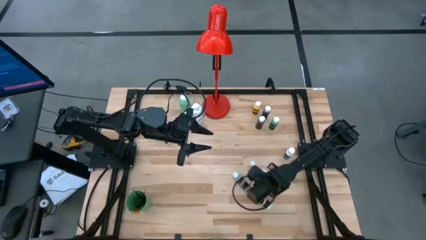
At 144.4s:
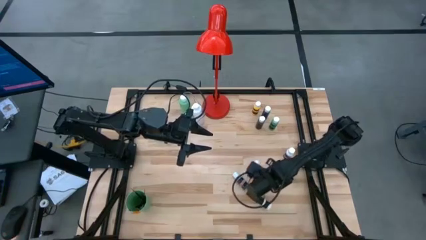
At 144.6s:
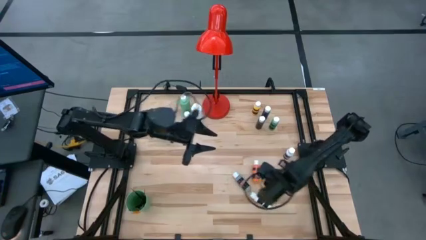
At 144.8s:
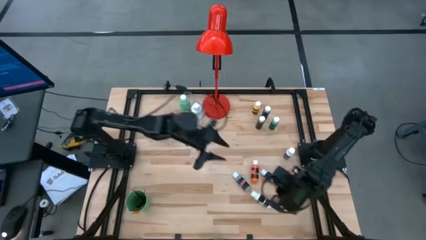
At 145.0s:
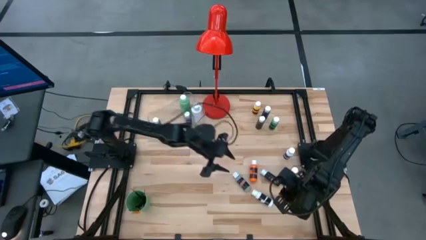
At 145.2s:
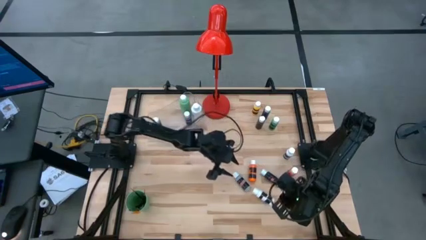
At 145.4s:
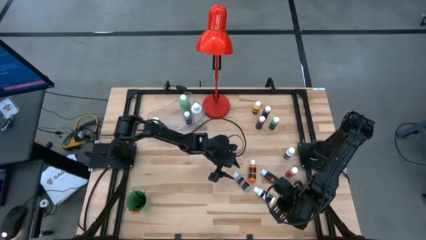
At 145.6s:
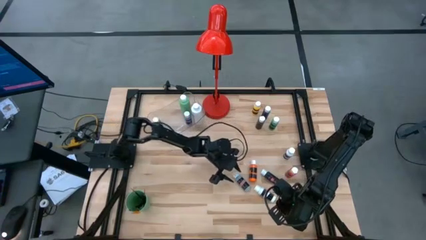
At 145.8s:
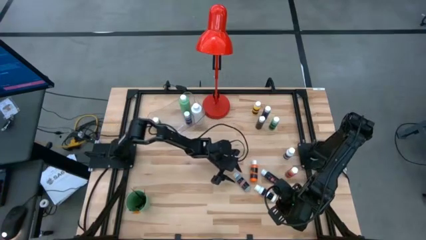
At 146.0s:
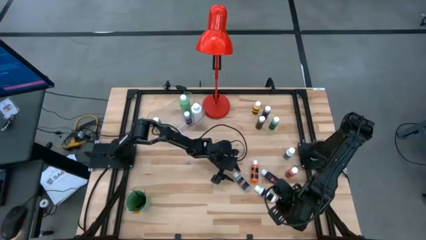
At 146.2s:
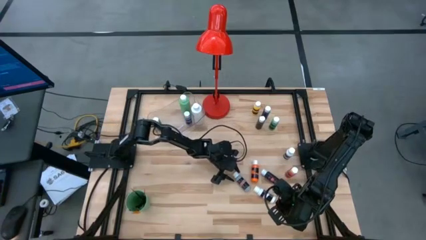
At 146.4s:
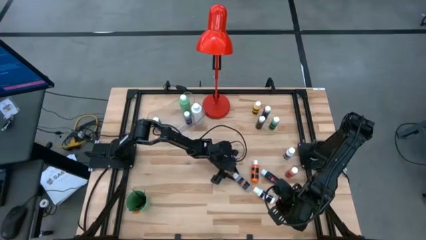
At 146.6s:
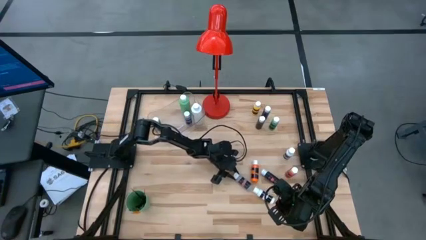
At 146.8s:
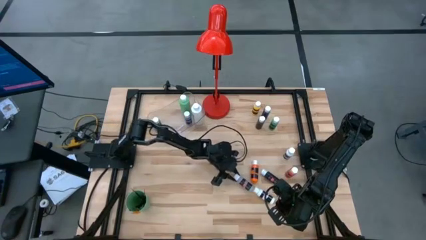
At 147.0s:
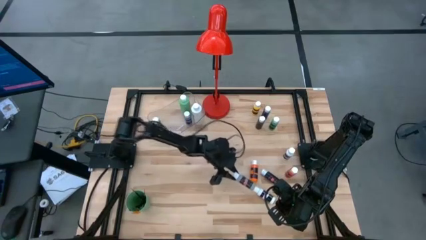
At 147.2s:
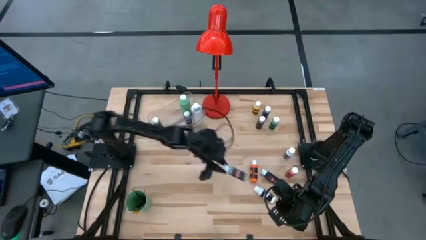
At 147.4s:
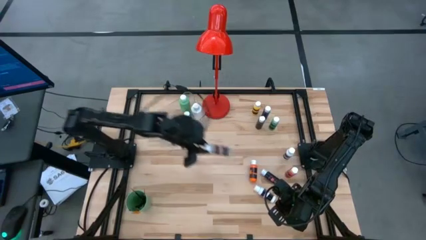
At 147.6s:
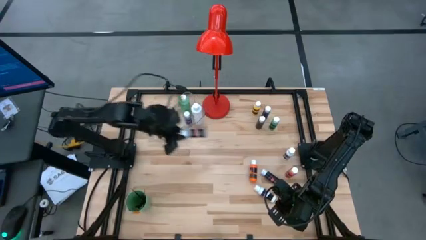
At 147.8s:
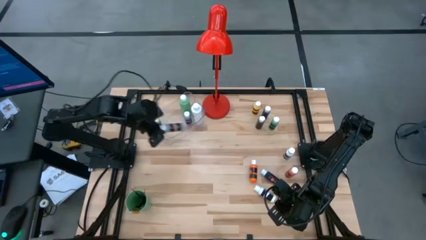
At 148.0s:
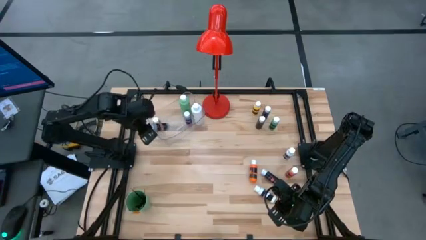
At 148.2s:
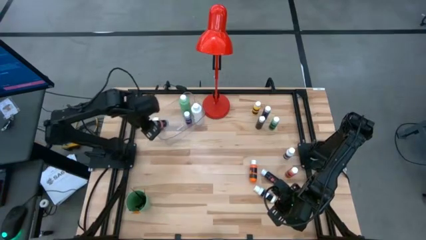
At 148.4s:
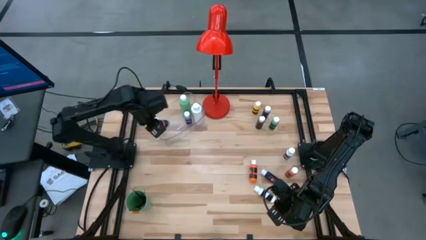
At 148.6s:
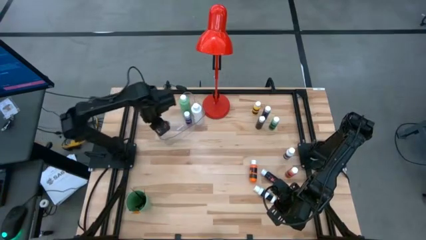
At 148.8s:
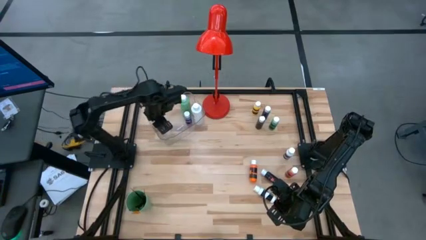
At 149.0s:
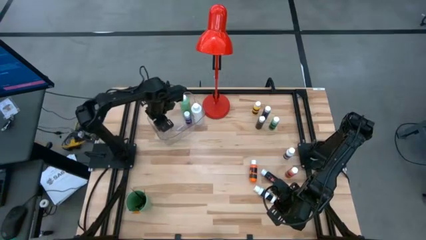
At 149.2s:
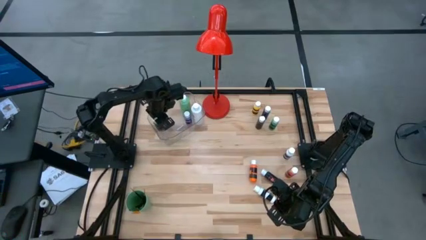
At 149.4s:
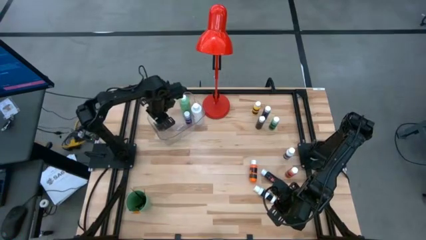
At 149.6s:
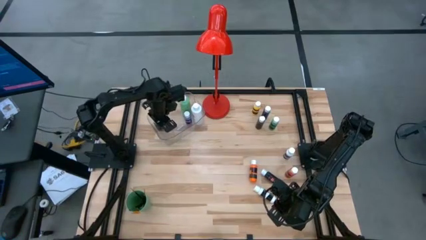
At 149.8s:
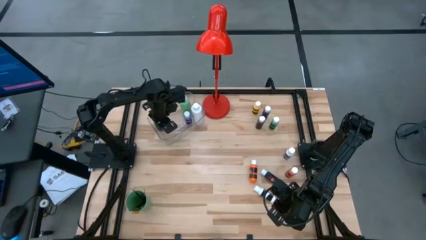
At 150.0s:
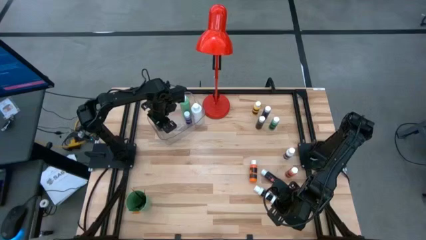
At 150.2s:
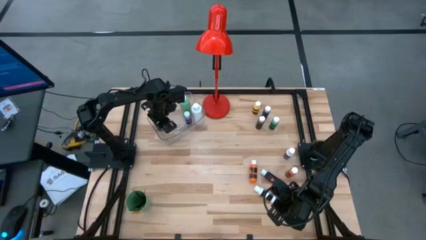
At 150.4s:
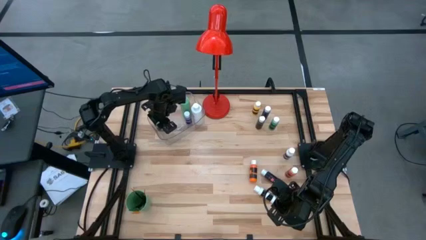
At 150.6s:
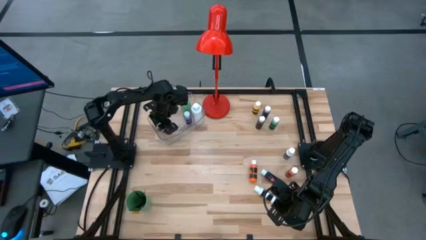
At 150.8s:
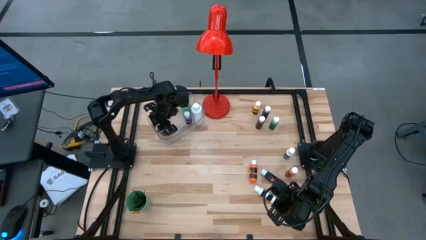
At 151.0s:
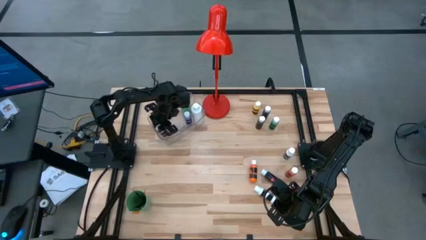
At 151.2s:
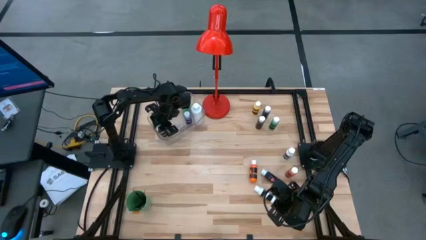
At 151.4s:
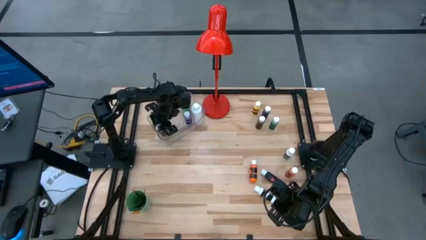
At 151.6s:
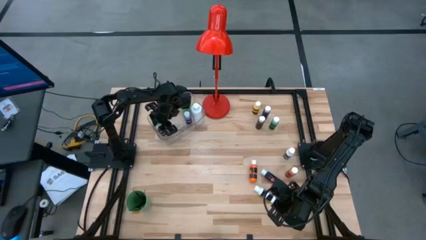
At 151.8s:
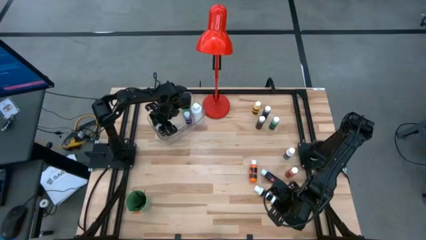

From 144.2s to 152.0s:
Task: Pick & Place Paint Supplies
Put the gray paint bottle into the transparent bin

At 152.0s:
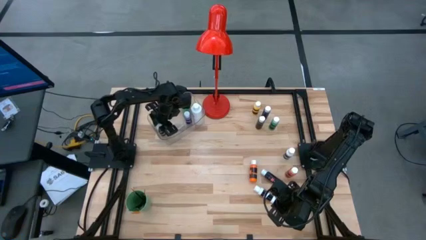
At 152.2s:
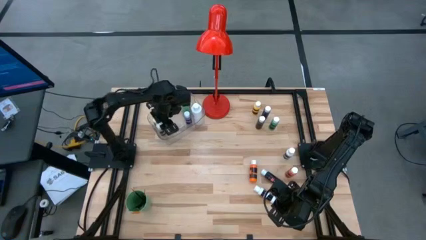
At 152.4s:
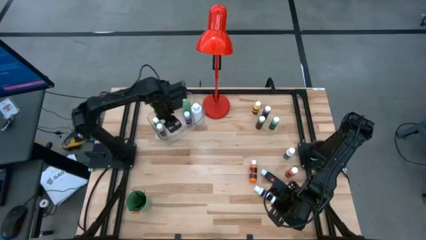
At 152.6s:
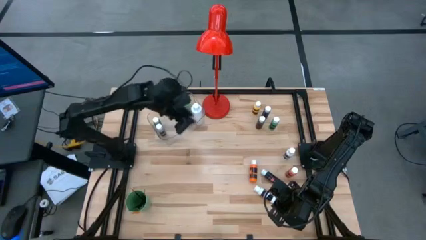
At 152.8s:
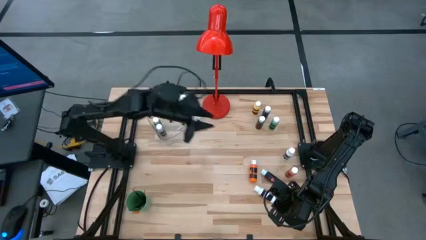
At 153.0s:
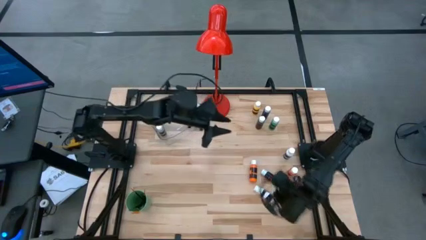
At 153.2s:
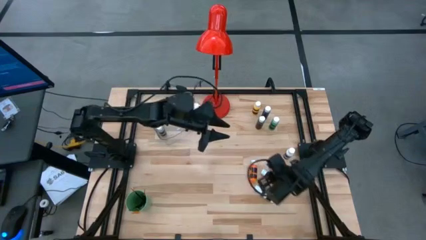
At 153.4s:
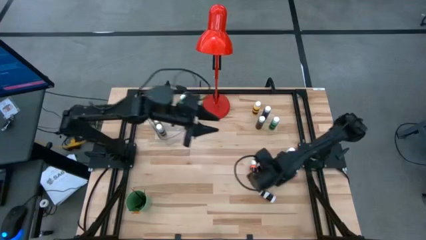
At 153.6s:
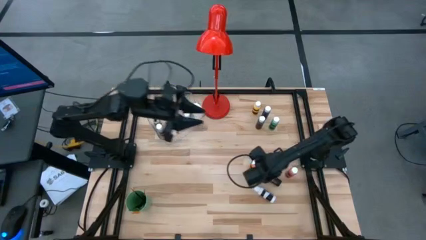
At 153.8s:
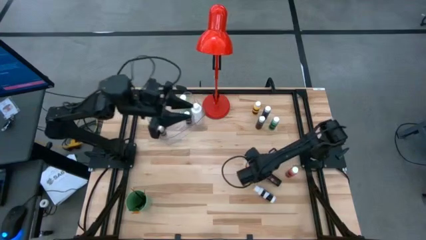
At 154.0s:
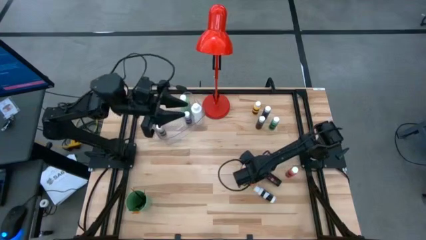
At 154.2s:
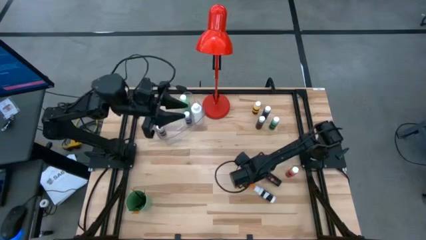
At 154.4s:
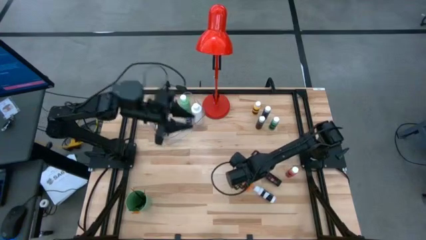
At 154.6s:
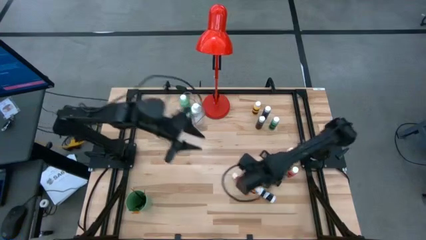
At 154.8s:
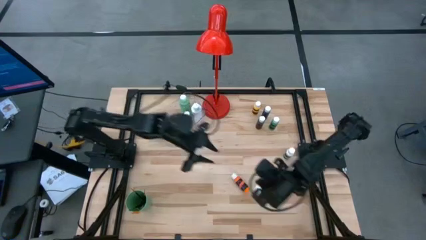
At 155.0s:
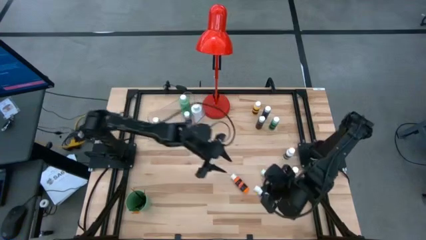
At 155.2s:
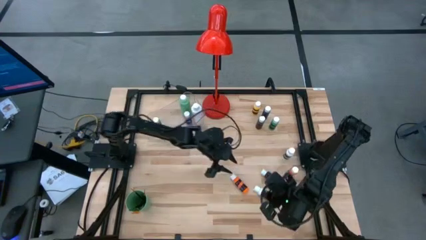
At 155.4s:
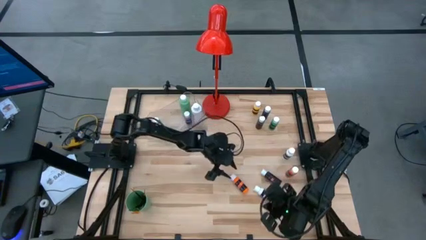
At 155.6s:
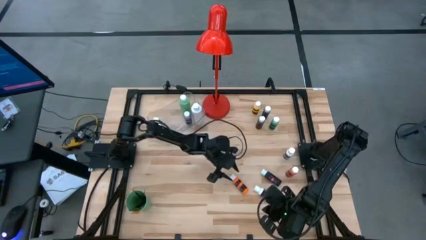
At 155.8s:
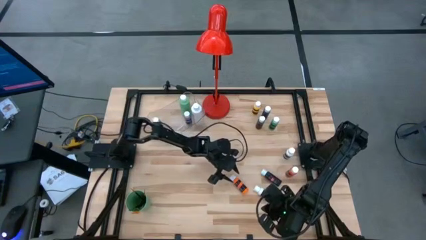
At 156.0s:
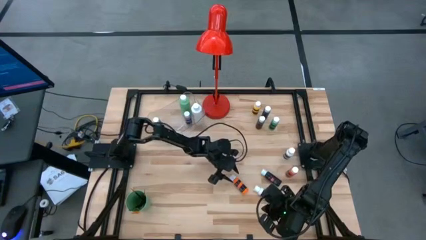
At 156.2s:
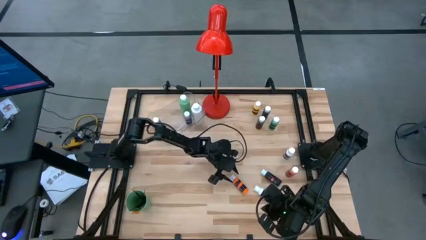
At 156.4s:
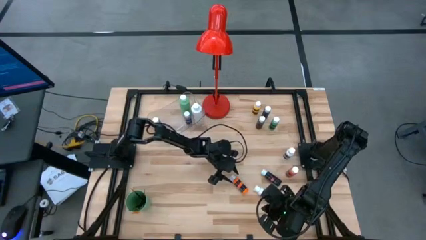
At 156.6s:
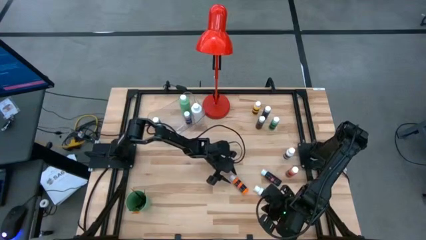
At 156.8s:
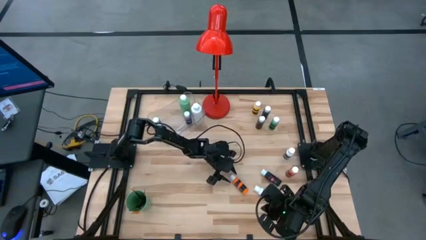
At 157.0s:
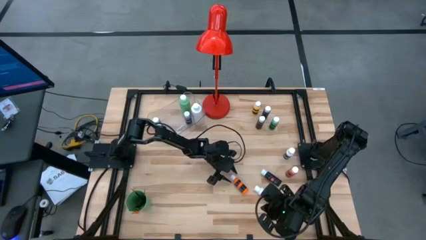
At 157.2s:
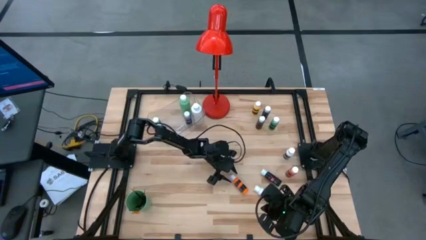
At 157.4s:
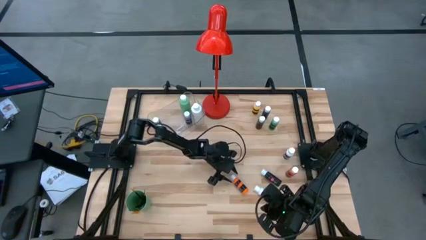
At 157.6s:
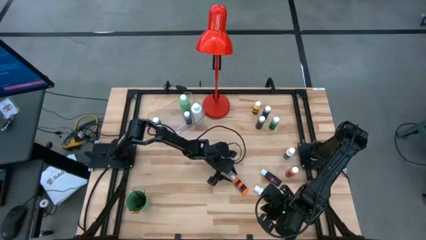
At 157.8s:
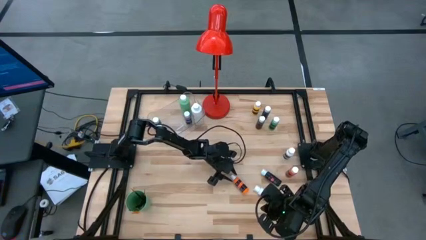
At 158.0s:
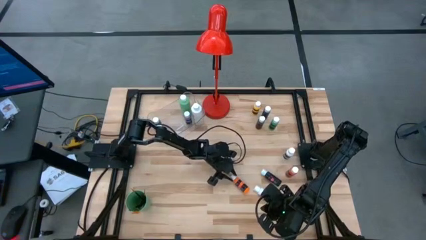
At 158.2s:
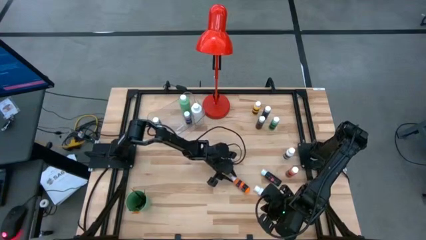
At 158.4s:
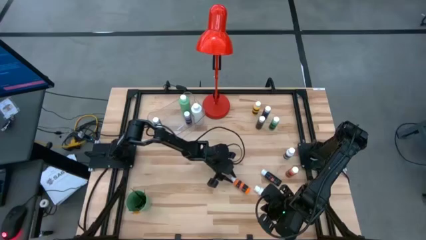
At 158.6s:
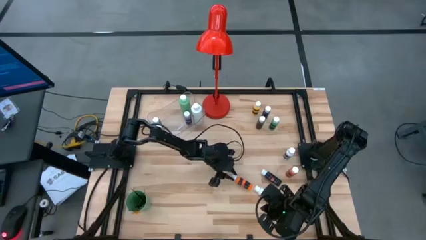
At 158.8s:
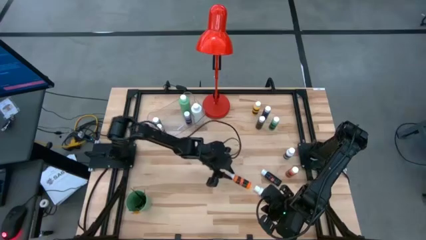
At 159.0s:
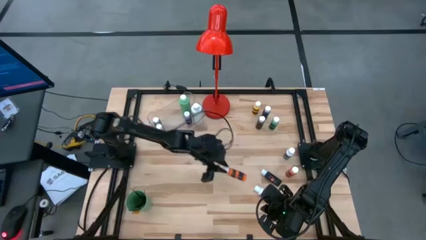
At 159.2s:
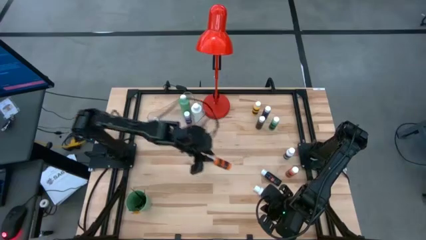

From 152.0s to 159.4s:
Put the orange paint bottle into the transparent bin
